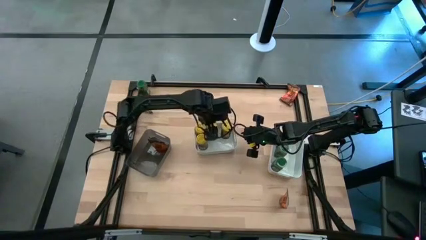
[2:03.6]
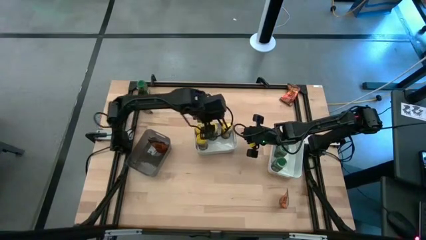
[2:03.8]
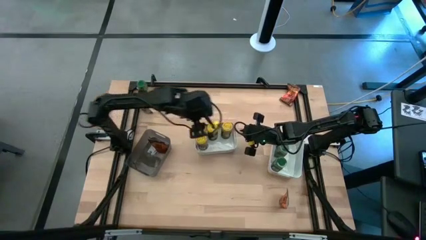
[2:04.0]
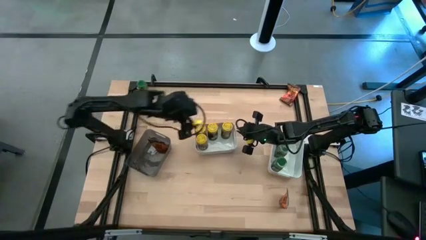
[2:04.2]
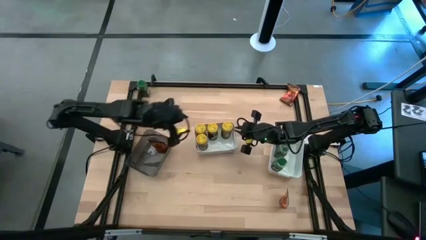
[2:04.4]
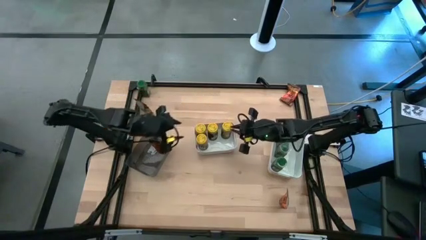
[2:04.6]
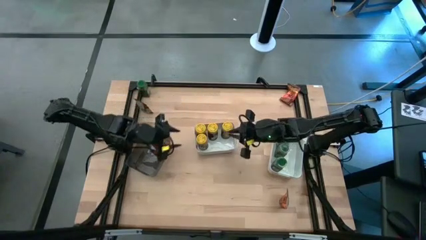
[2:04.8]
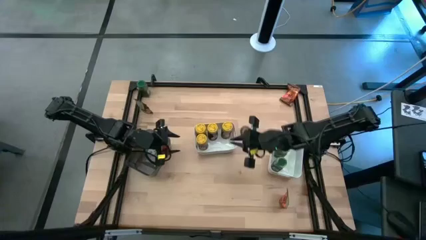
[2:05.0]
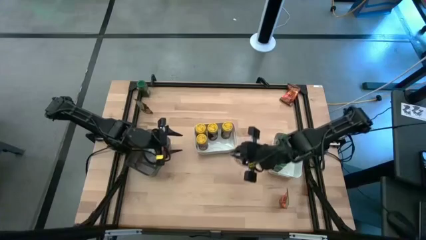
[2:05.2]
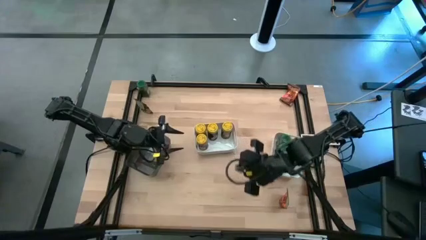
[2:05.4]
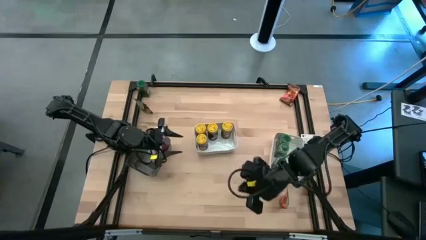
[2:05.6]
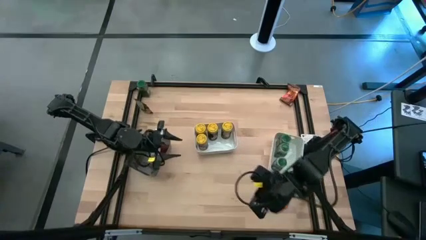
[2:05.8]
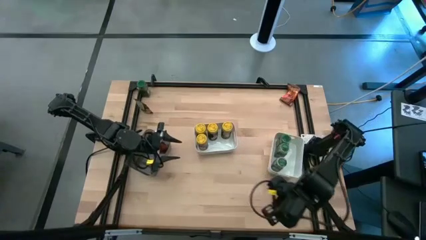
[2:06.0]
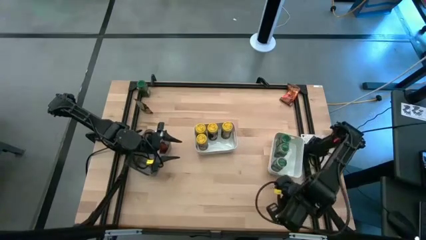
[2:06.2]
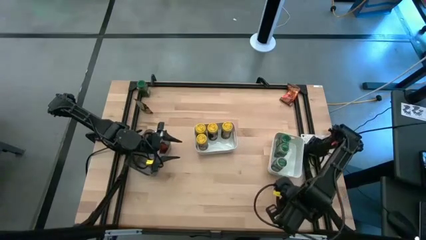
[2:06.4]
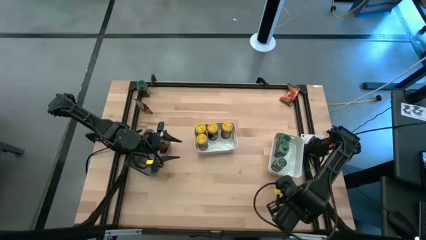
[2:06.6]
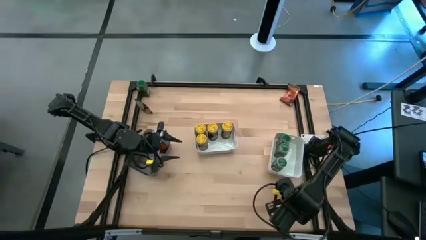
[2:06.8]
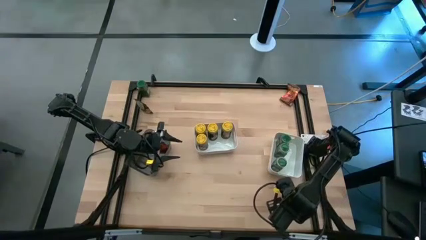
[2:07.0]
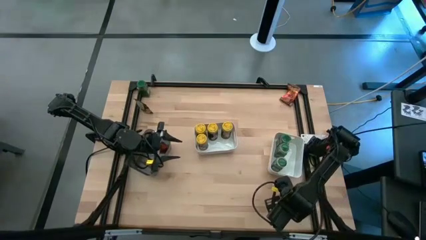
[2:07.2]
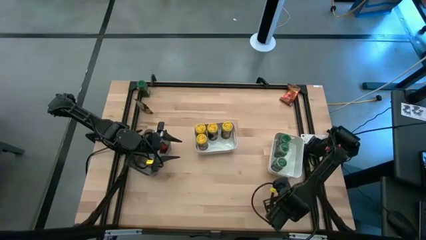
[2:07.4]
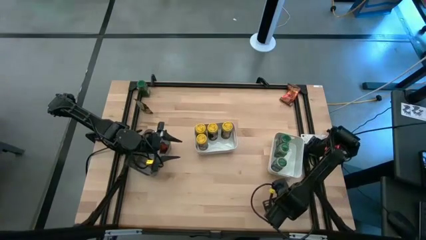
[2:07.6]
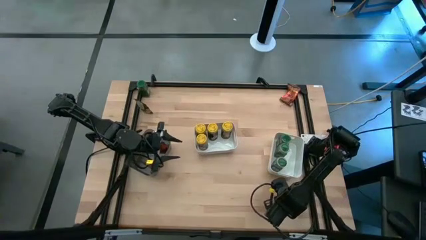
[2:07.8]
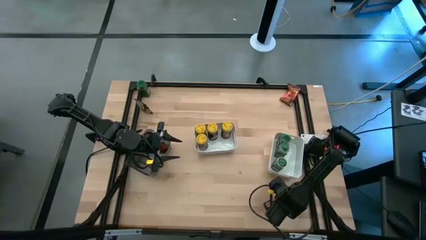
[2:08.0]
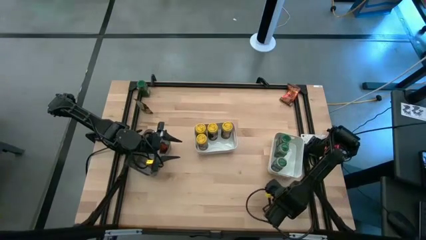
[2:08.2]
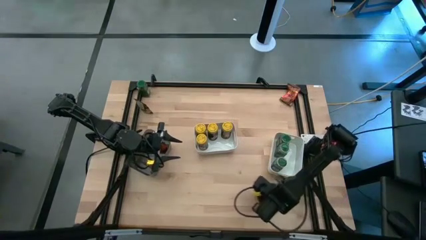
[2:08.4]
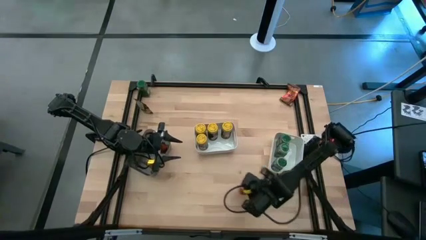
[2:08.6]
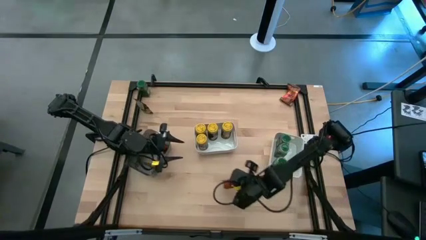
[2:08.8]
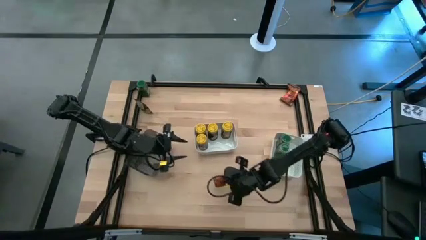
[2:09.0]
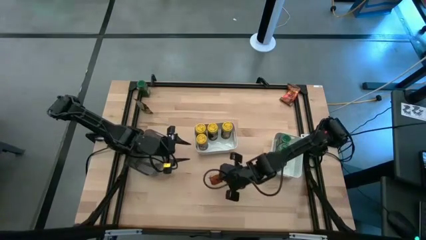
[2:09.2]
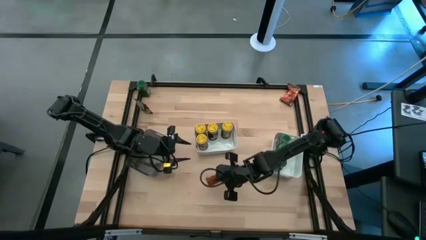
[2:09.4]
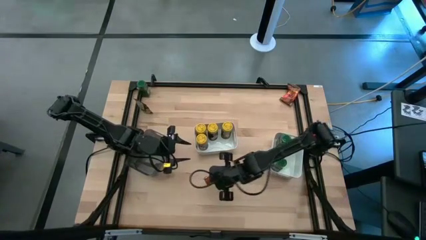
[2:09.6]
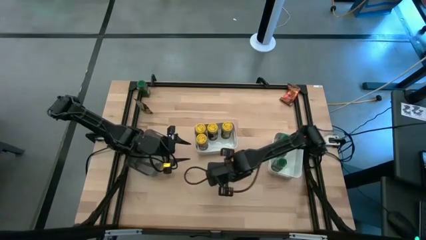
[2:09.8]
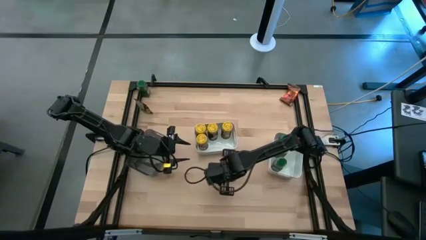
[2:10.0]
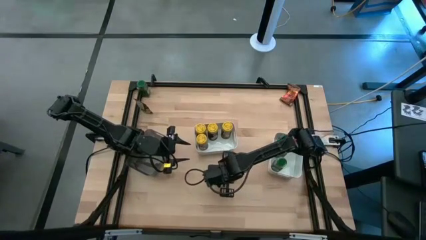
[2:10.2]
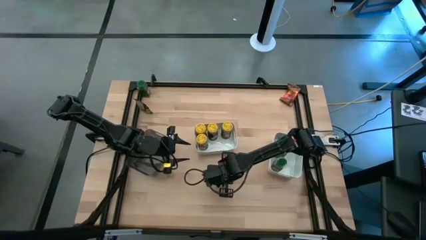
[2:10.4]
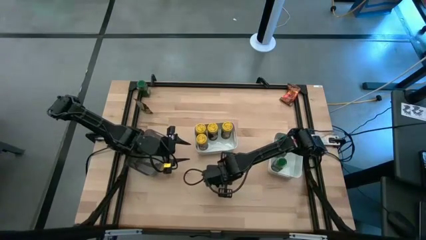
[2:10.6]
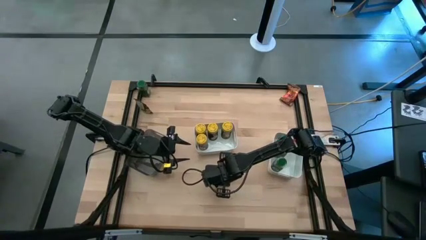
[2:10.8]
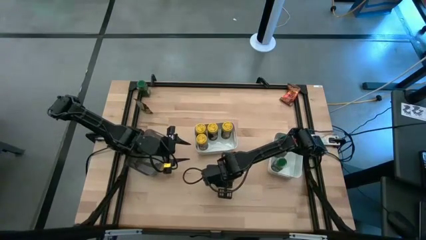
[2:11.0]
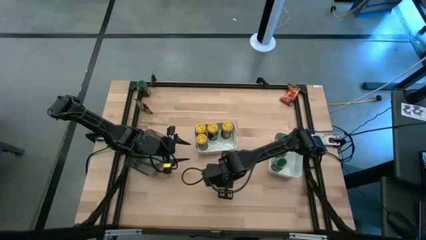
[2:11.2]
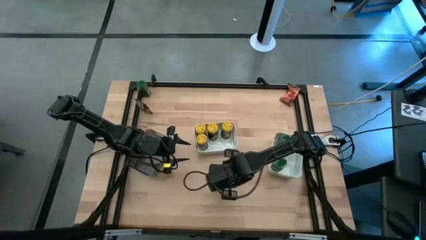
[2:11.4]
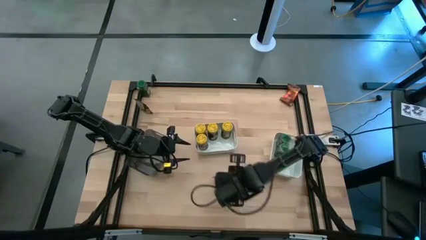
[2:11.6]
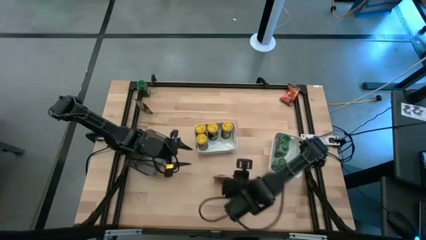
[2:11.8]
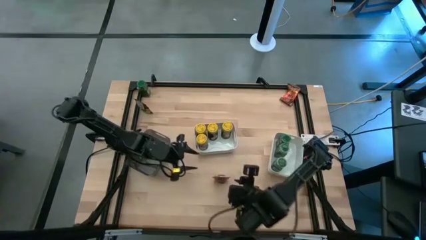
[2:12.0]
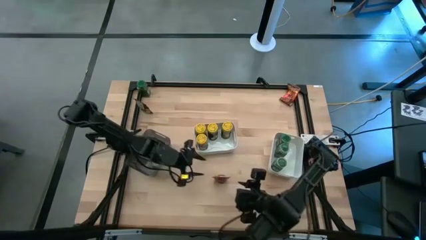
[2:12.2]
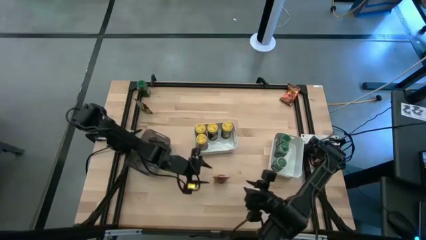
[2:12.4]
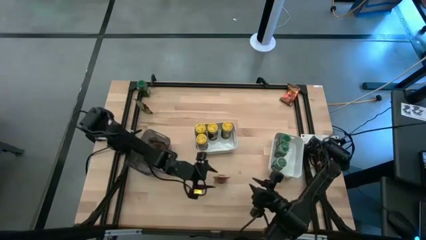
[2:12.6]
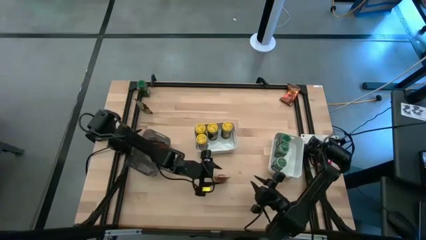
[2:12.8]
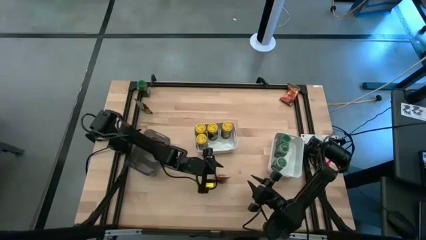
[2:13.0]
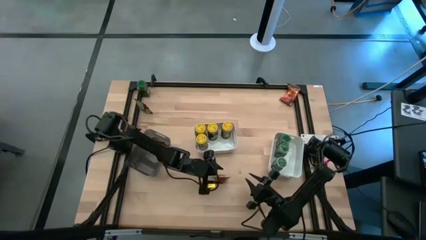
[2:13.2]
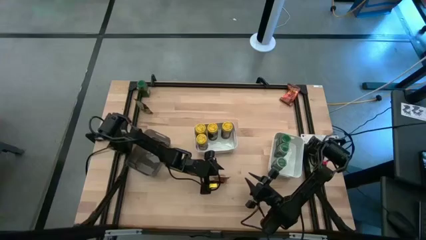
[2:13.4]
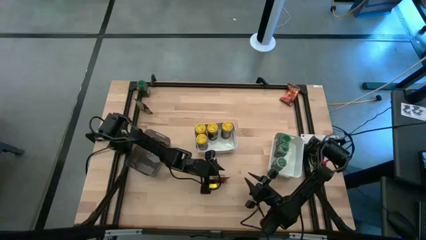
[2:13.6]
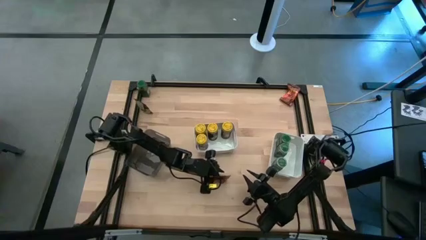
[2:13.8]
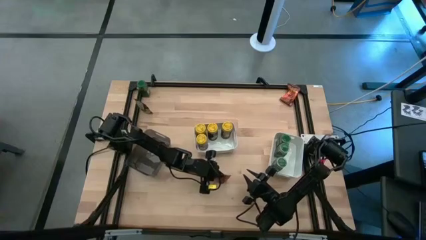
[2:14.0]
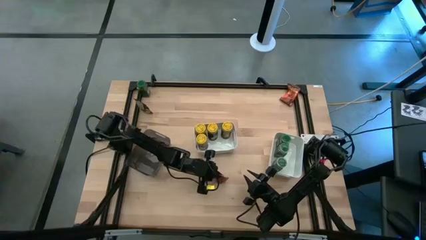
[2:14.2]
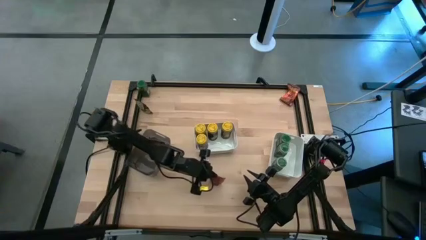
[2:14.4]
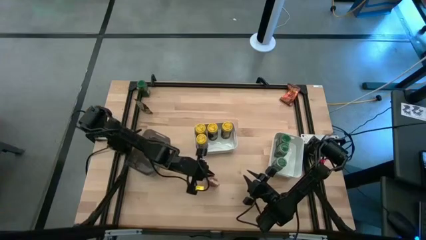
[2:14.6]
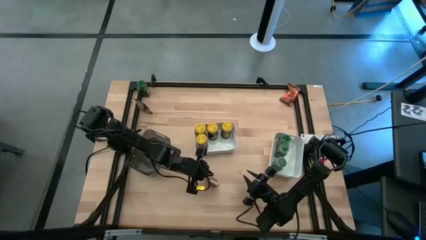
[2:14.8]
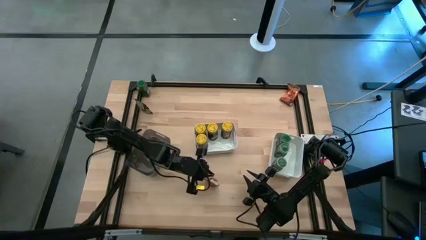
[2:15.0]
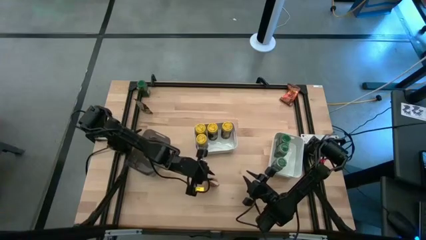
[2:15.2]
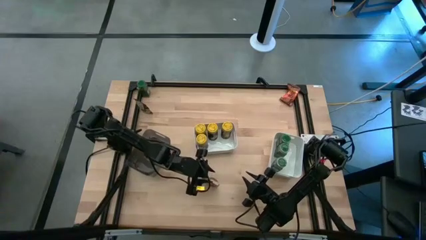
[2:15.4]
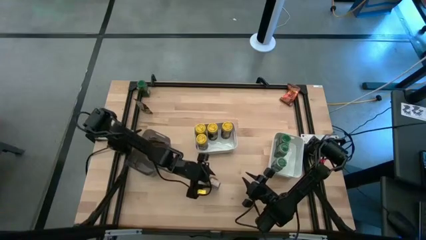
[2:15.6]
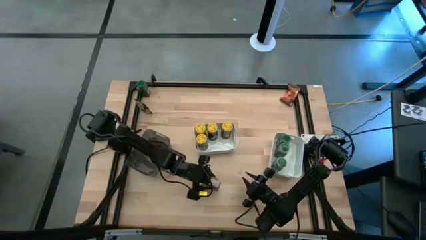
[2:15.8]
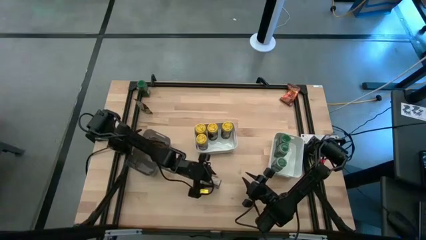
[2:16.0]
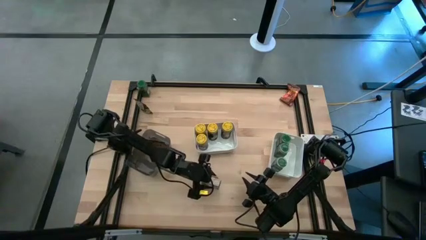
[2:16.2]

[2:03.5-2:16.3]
Task: Sort spices by type
Put the bottom orange seasoning pack into the black bin

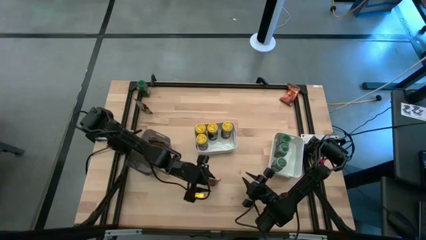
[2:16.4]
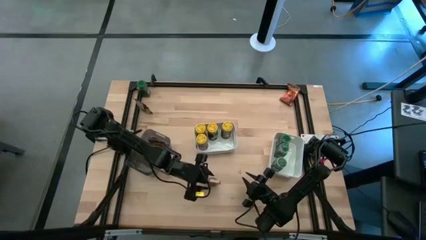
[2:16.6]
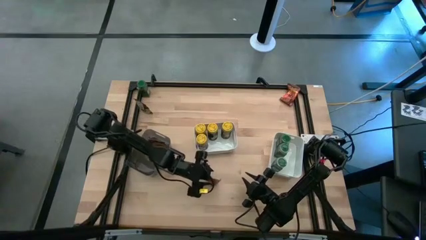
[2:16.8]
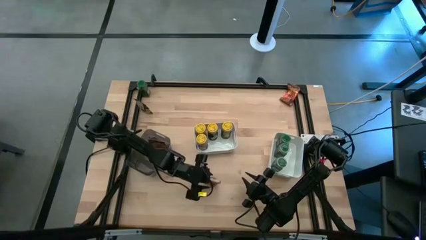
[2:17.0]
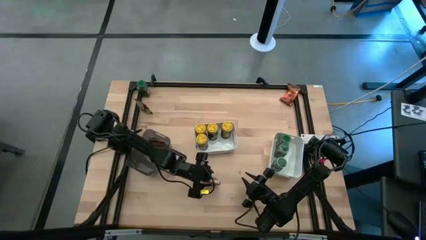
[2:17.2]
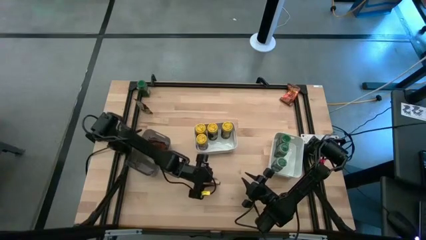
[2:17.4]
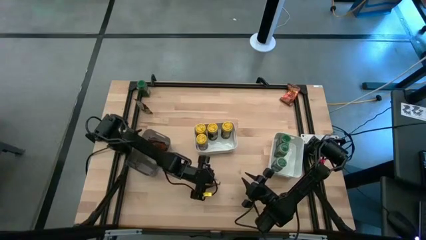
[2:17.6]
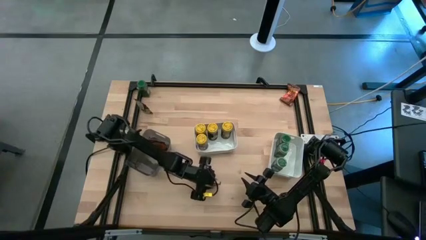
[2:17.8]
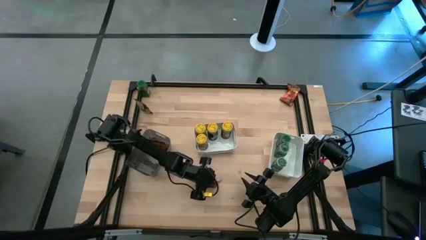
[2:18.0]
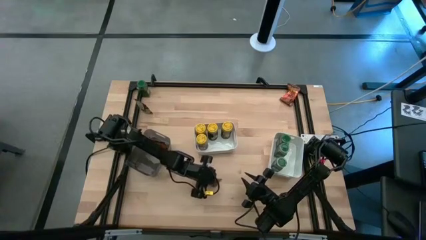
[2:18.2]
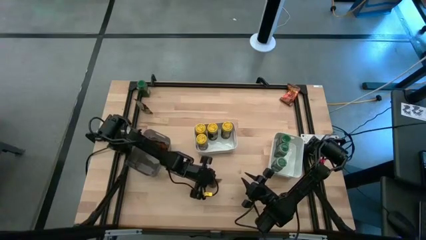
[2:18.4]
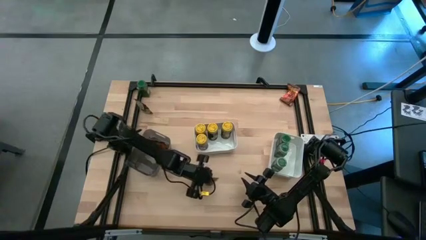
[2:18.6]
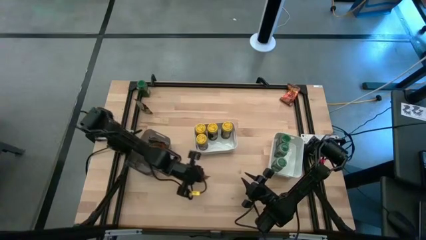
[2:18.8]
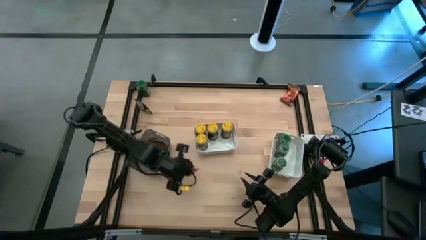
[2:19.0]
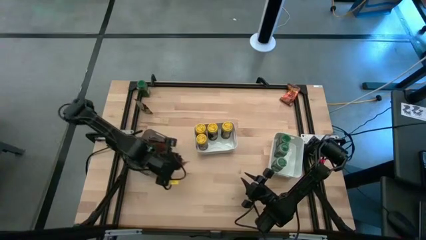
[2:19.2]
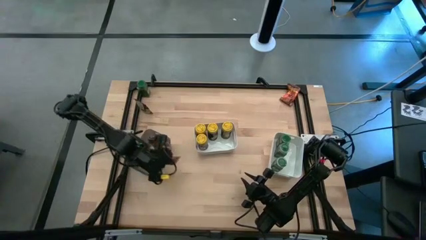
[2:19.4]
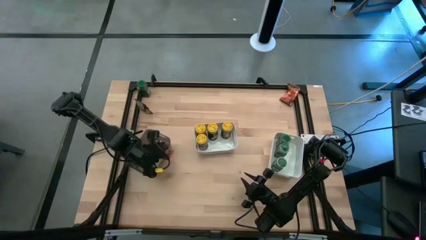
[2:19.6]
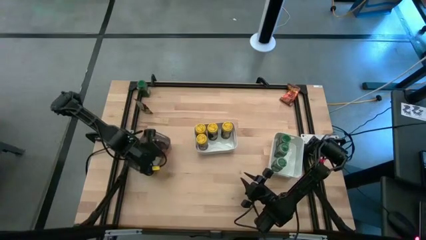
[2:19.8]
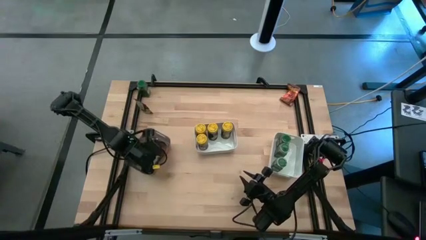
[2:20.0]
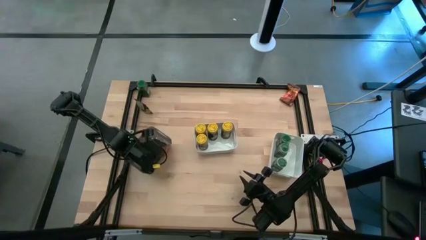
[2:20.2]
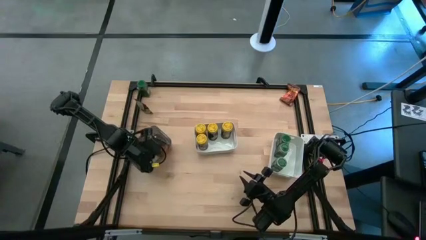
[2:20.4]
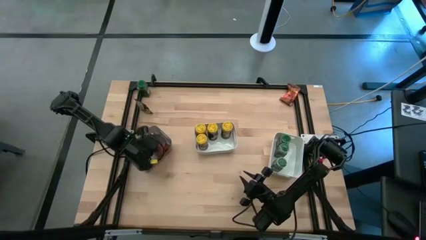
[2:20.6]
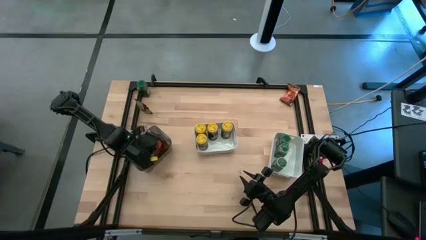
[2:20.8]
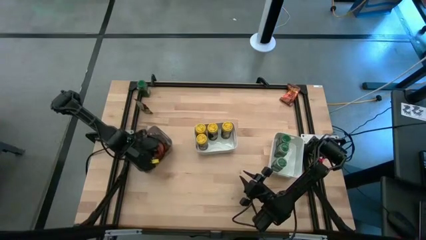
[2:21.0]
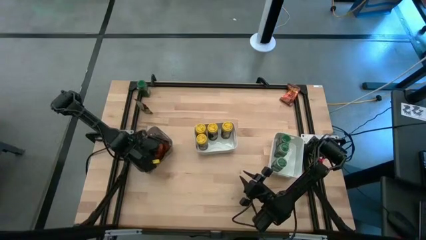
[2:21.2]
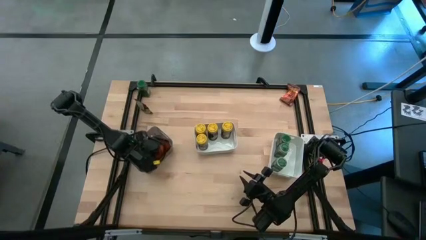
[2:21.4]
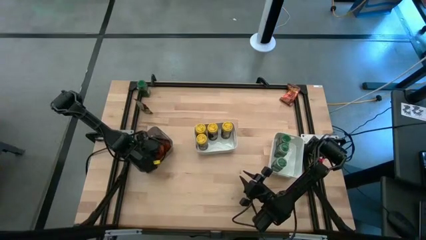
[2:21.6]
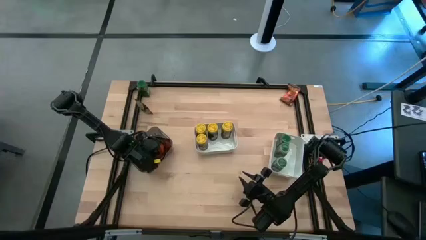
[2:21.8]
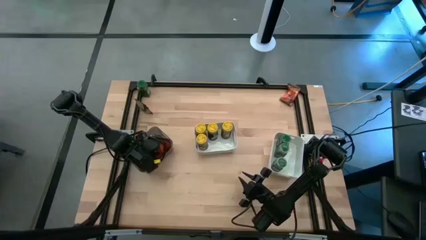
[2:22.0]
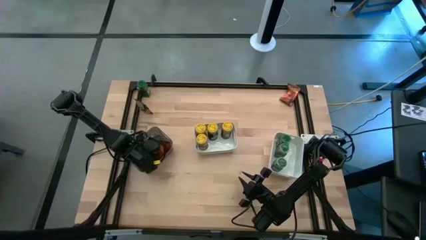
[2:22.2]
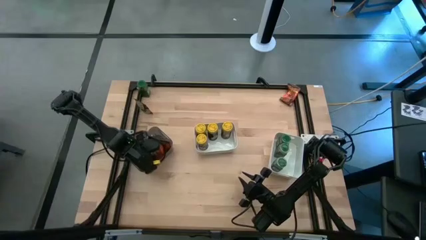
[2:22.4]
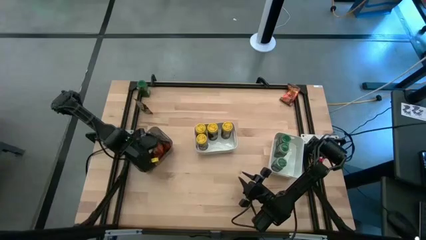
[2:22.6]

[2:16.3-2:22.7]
Put the bottom orange seasoning pack into the black bin
